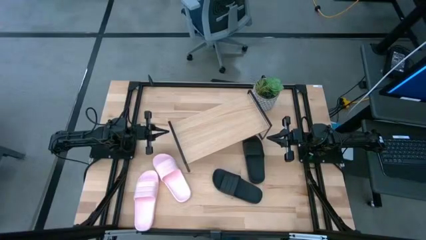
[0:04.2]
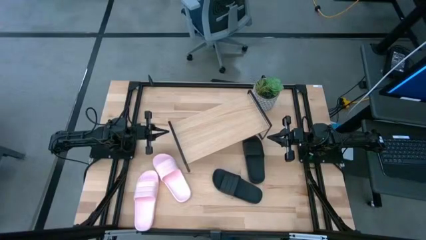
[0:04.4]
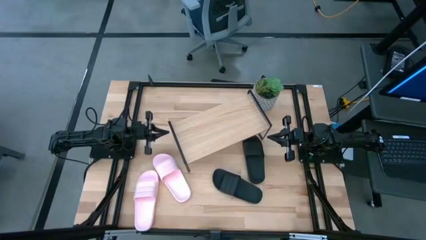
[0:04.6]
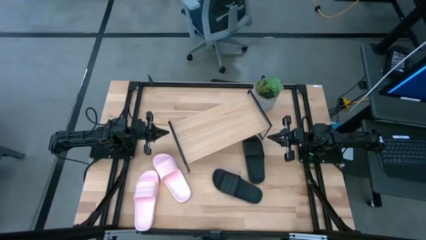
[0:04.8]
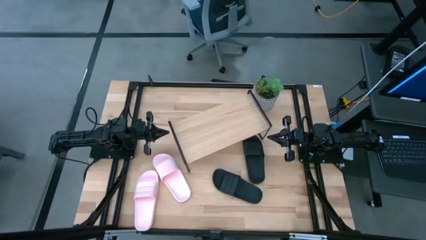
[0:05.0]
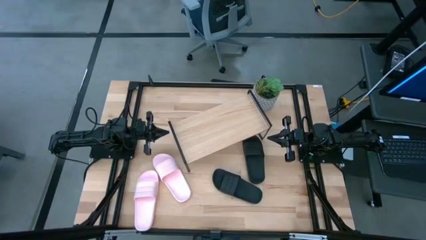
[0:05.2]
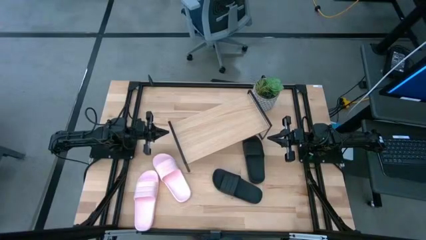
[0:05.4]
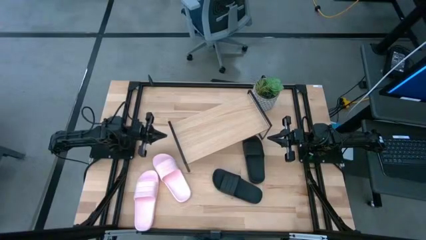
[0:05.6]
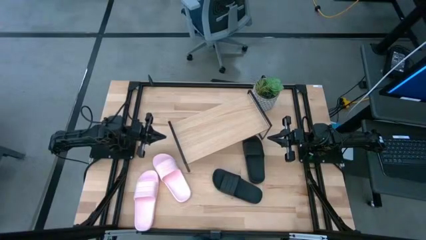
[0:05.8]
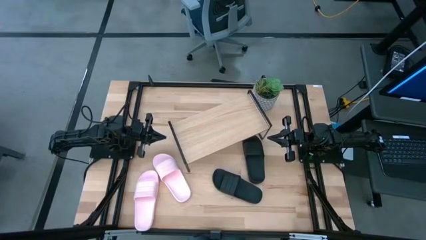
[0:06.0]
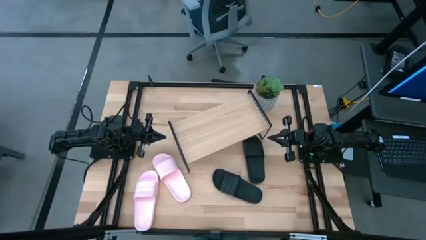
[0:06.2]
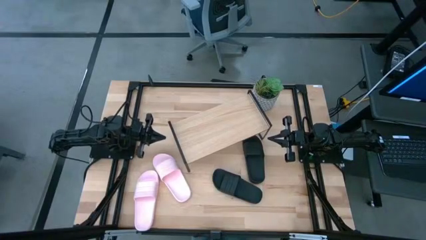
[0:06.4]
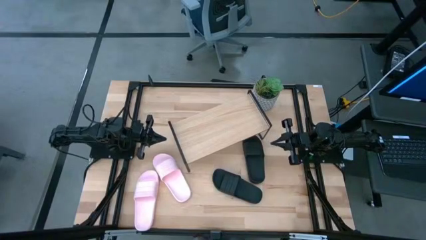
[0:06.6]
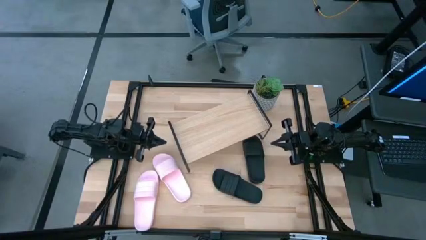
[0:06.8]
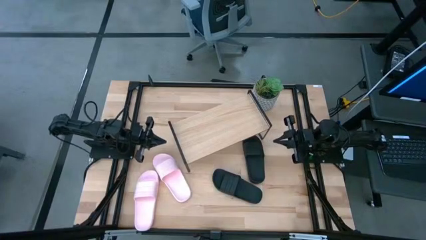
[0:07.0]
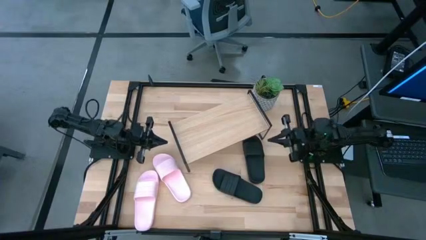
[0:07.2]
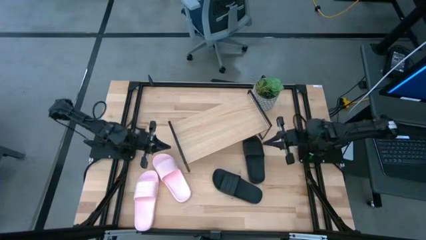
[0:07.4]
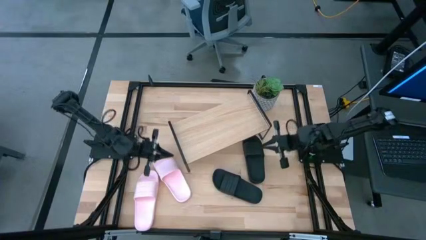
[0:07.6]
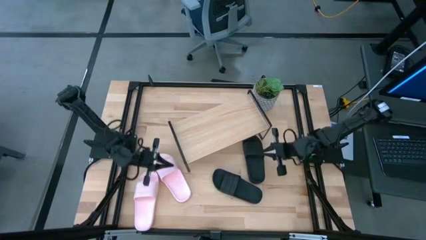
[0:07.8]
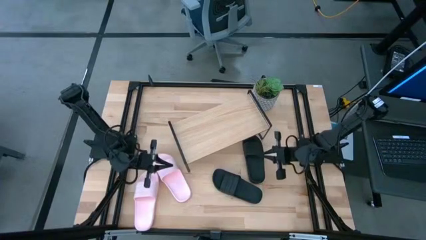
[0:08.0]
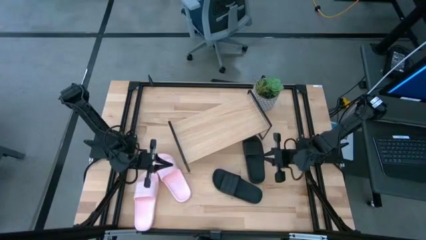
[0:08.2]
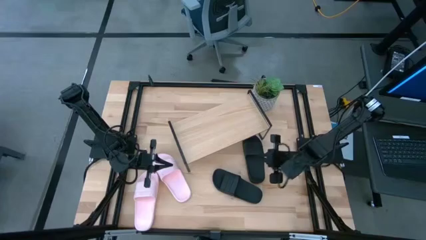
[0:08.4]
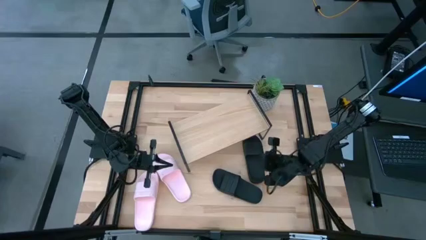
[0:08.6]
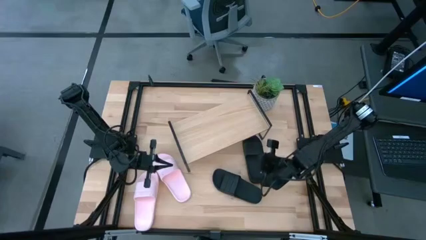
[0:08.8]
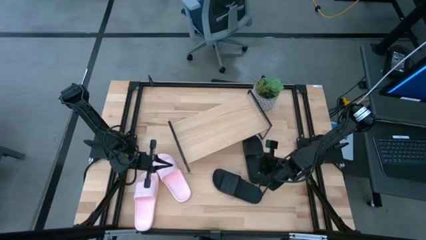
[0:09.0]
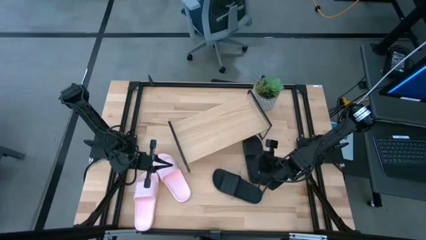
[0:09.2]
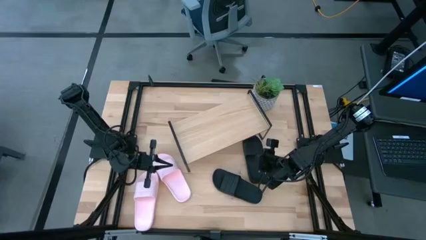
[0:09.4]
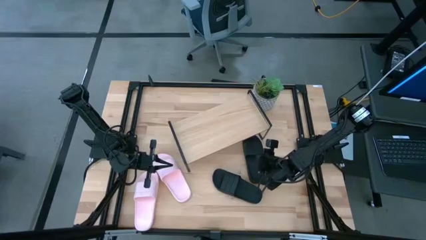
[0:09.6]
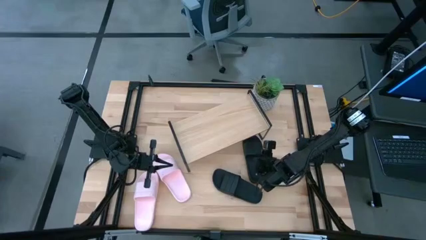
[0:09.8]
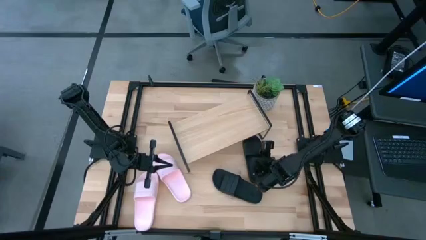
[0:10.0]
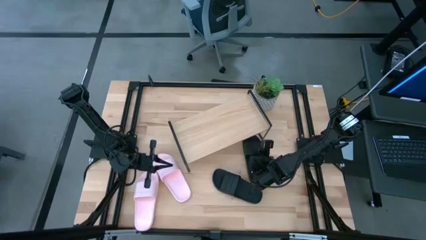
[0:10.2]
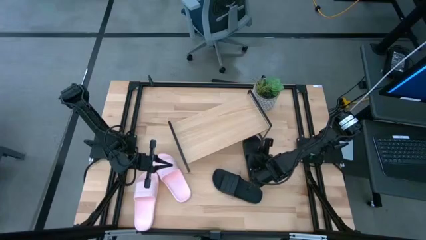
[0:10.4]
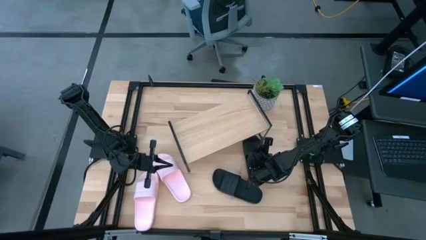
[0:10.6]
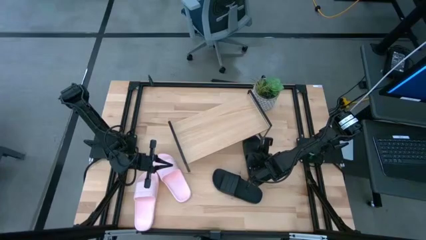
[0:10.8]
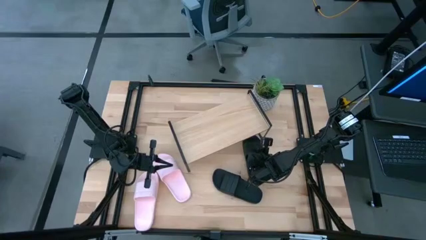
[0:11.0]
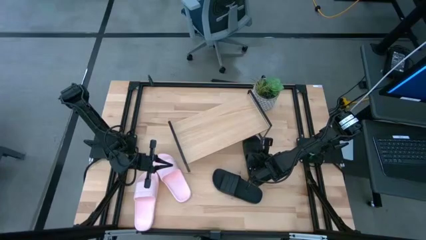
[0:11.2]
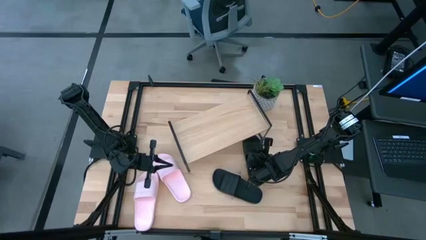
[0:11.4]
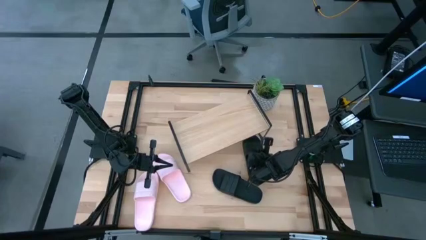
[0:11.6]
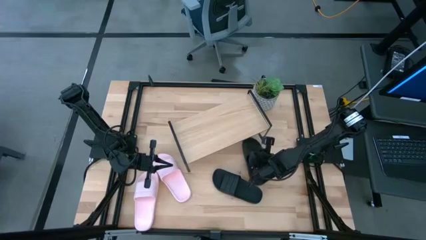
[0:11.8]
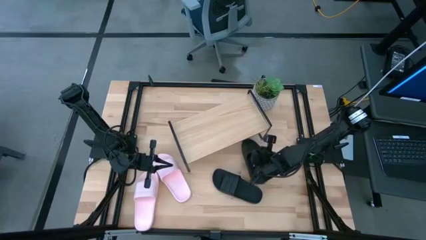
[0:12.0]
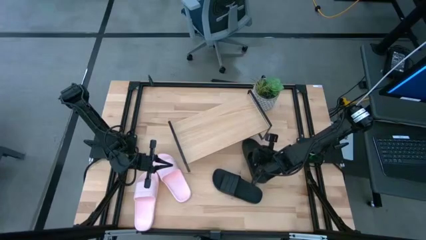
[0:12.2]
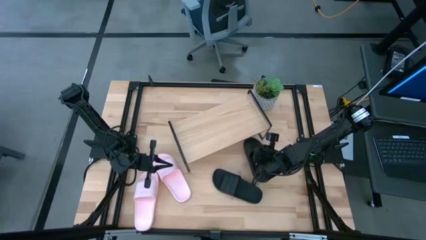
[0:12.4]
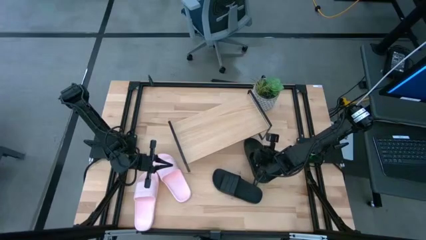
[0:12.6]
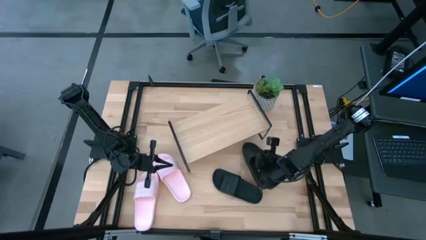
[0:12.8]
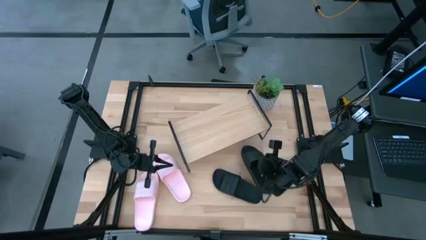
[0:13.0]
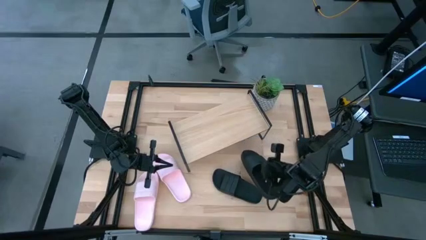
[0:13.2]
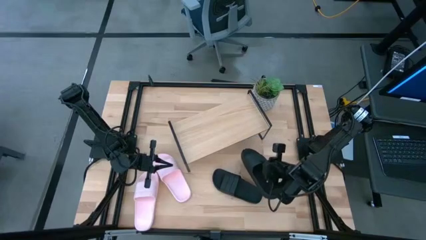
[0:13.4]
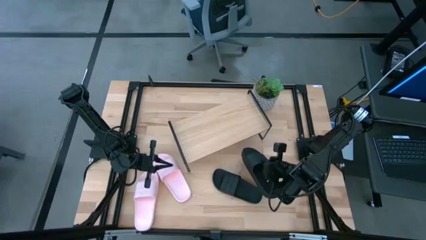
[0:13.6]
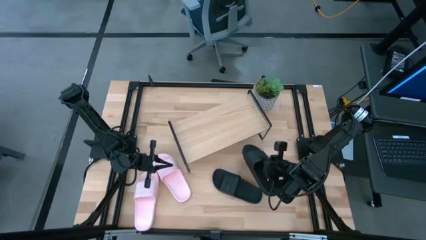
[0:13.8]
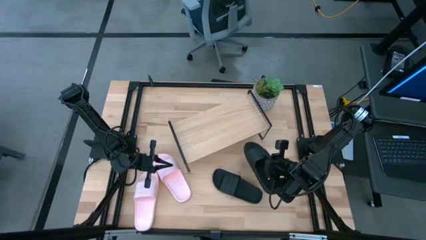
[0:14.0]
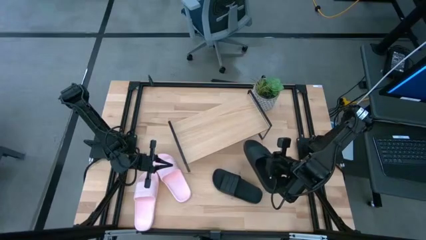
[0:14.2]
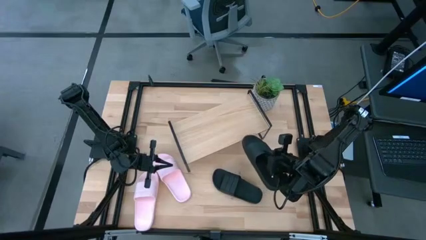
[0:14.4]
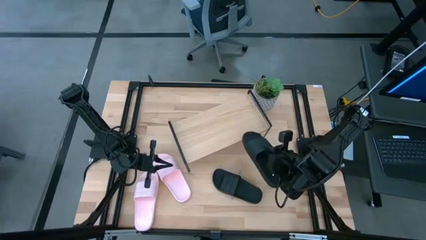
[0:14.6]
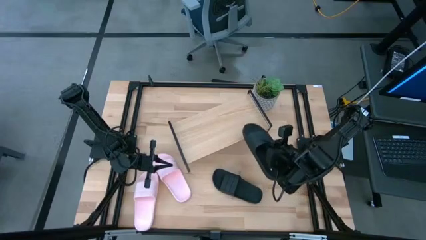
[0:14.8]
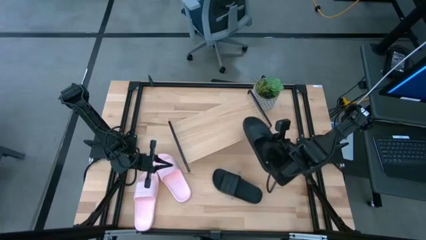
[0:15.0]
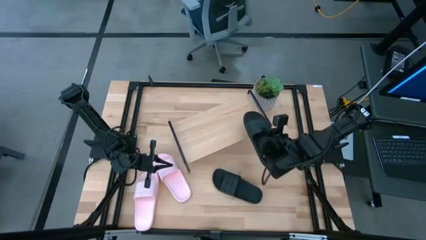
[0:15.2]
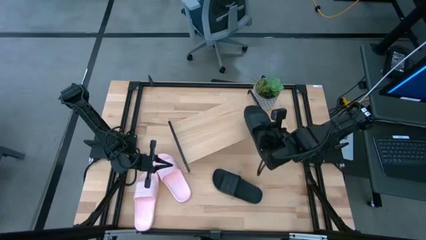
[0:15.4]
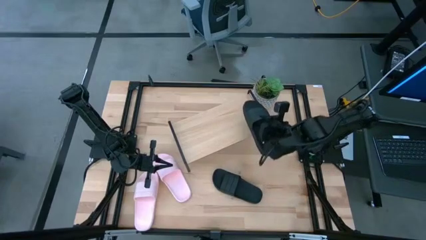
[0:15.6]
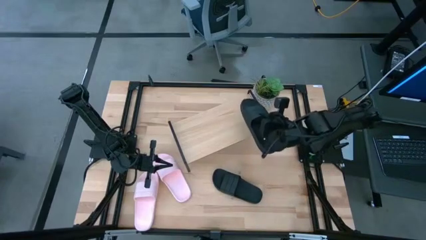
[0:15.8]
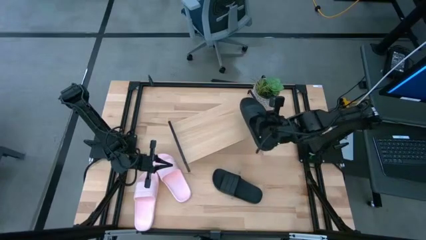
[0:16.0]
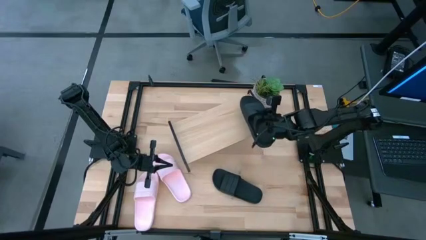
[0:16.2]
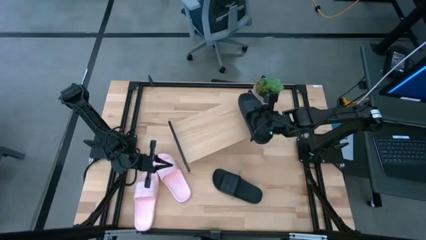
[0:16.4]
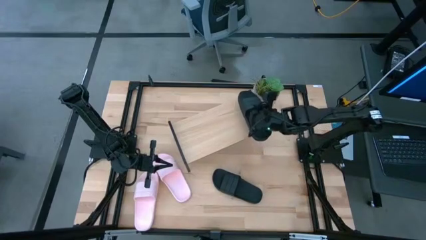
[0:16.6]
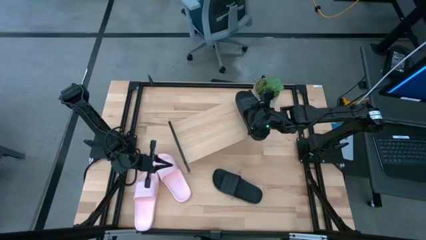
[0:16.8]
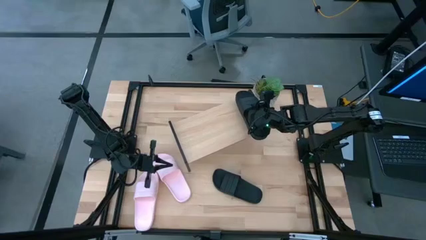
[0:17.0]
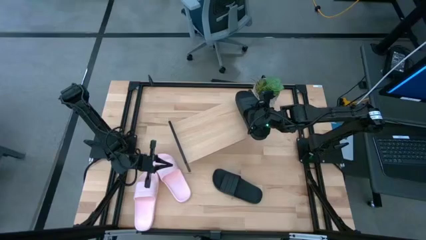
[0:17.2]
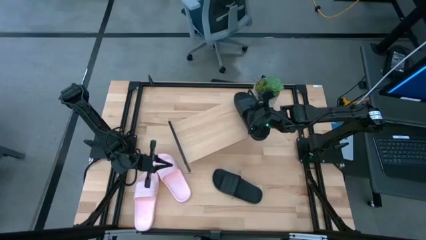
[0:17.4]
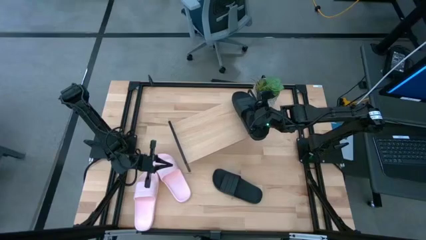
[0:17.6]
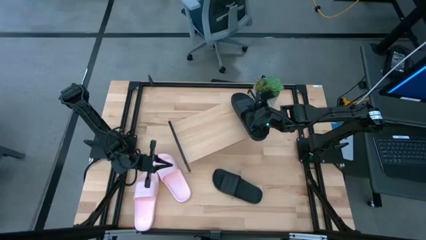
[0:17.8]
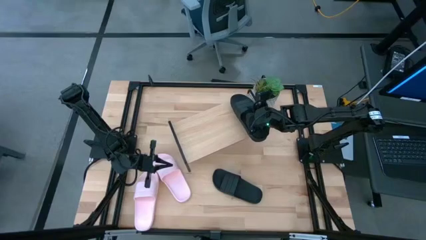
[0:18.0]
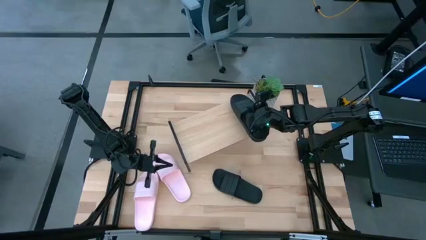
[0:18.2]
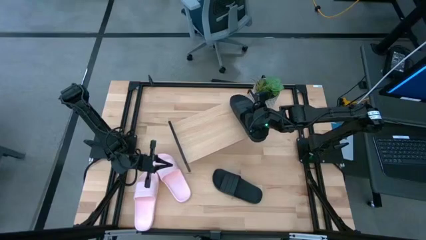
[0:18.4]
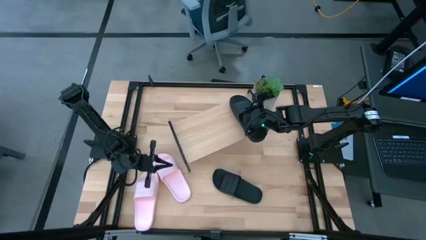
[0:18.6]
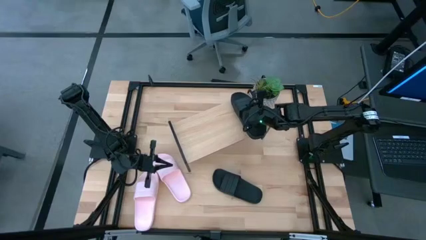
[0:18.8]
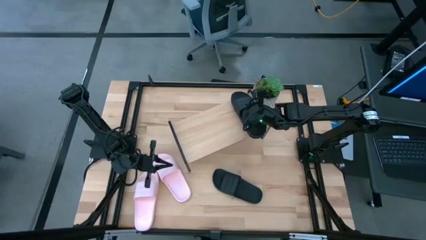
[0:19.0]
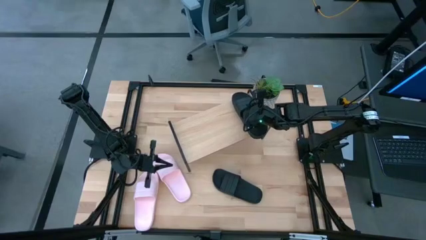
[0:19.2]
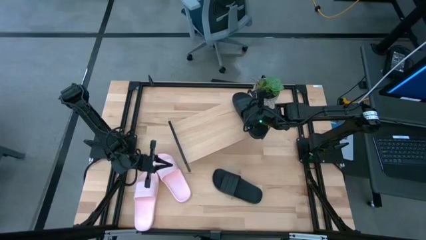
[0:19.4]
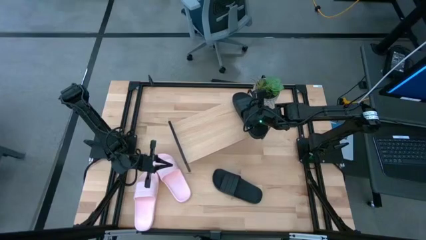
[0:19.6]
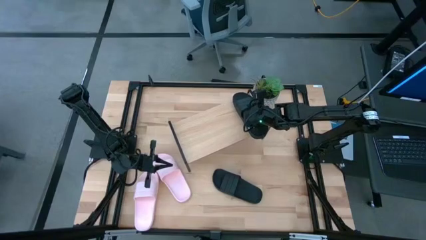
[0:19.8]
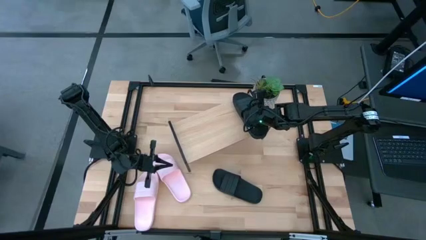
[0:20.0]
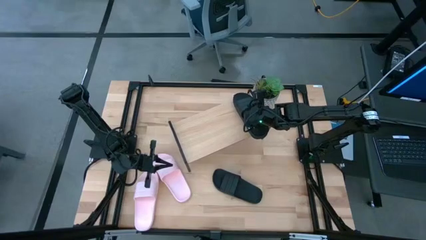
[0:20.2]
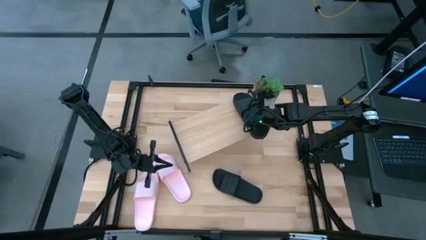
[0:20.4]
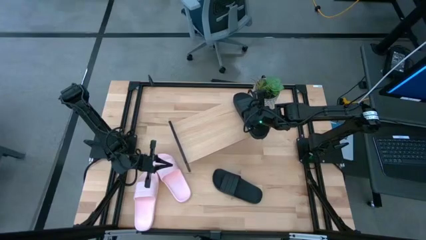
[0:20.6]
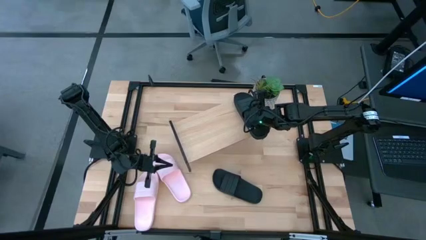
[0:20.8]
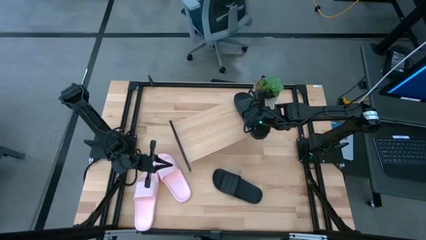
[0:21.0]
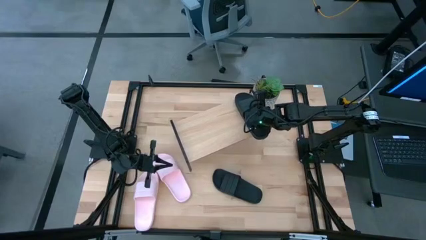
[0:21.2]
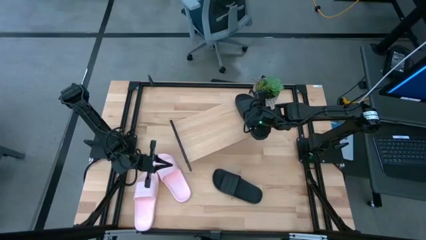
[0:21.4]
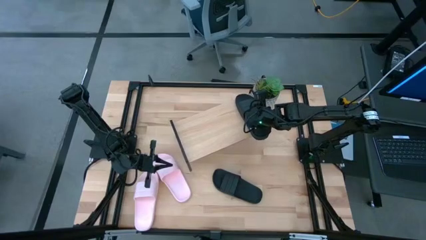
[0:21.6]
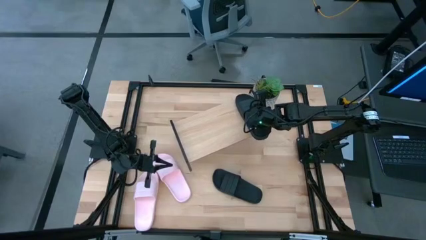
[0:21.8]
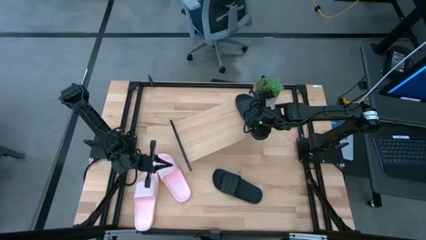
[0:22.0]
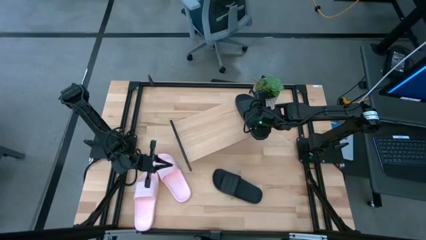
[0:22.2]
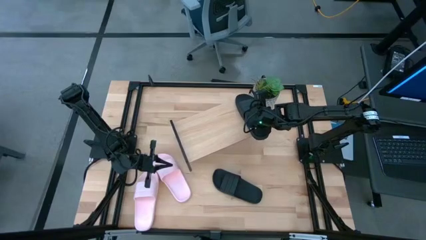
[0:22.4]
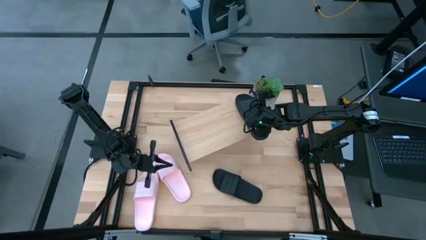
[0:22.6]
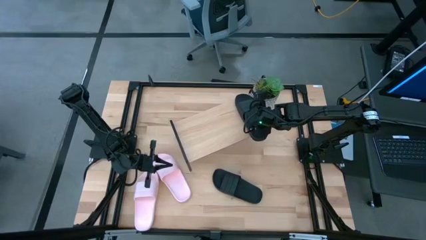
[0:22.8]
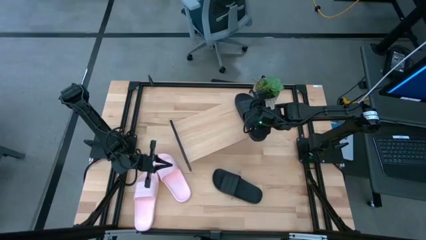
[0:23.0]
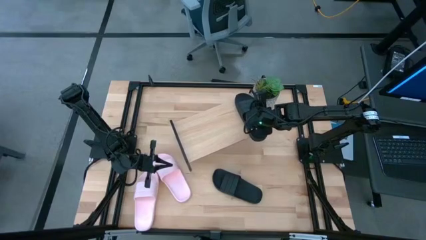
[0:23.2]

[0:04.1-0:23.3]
Task: Pick and place slides into the shelf
Put the right black slide on the shelf
